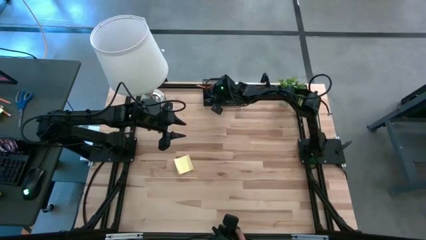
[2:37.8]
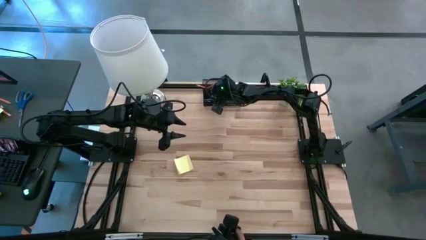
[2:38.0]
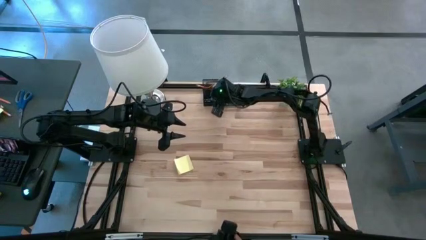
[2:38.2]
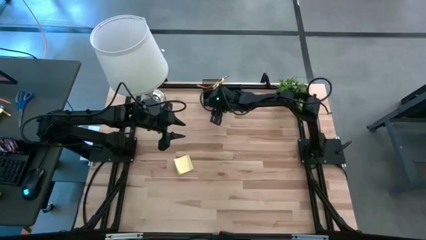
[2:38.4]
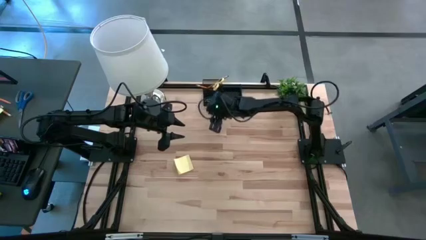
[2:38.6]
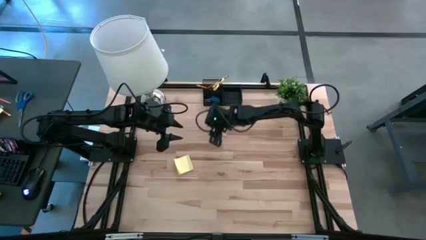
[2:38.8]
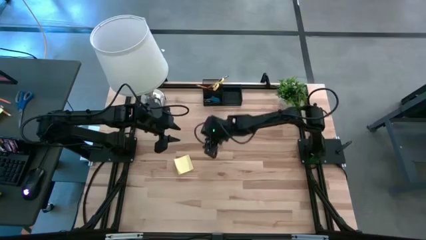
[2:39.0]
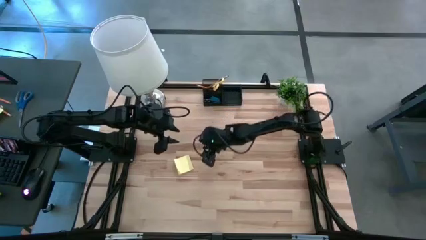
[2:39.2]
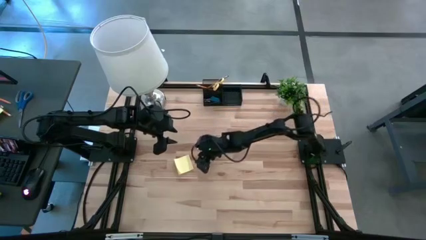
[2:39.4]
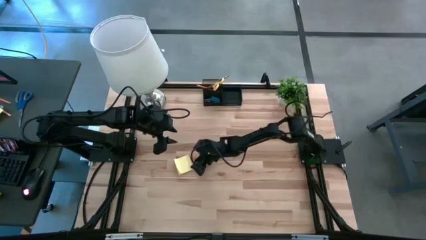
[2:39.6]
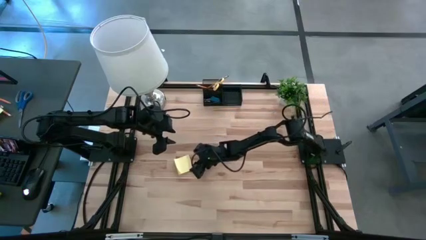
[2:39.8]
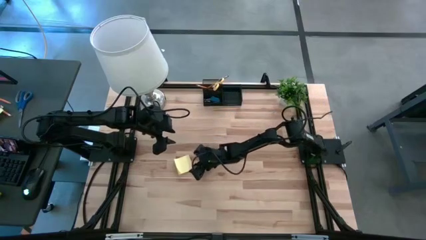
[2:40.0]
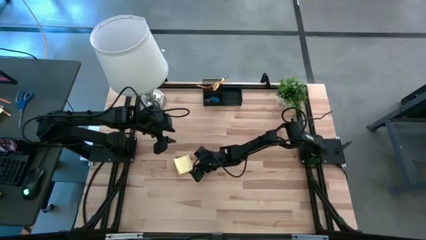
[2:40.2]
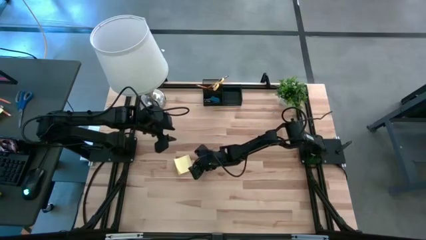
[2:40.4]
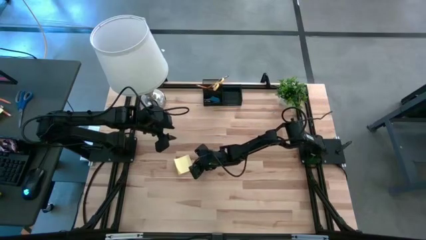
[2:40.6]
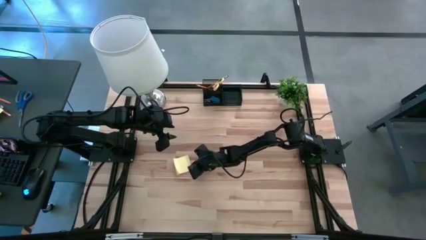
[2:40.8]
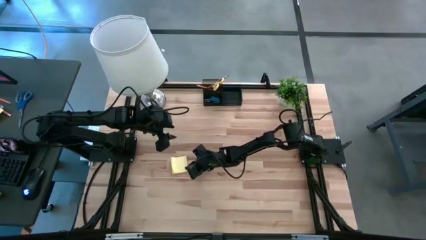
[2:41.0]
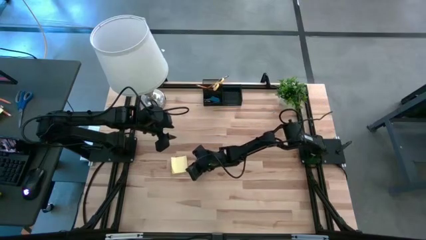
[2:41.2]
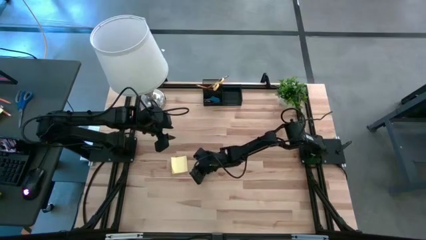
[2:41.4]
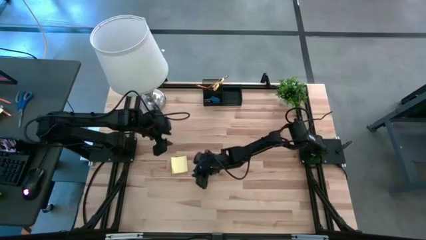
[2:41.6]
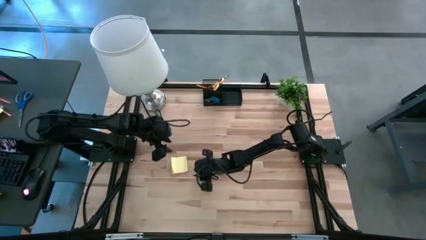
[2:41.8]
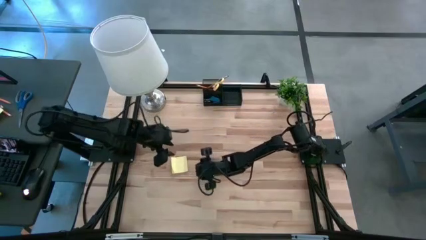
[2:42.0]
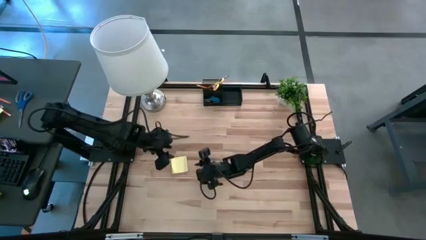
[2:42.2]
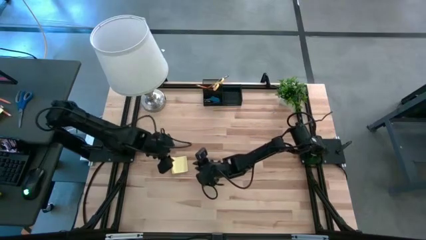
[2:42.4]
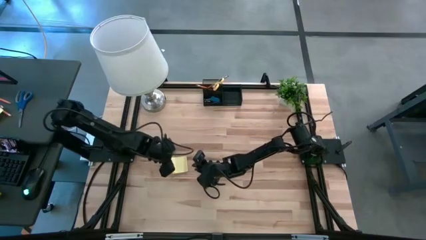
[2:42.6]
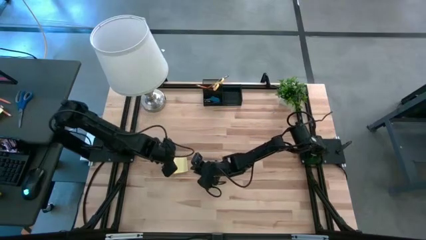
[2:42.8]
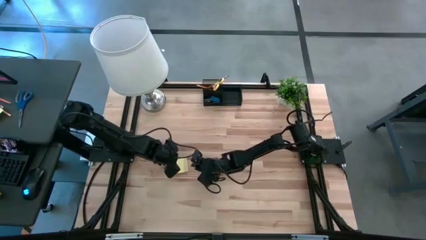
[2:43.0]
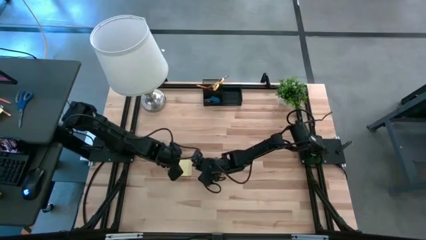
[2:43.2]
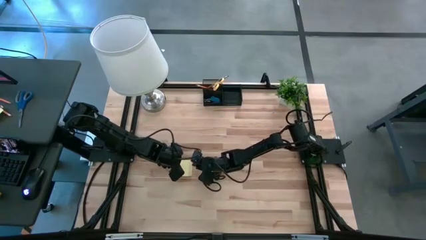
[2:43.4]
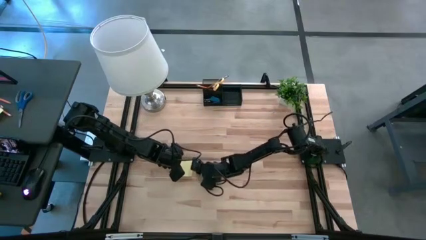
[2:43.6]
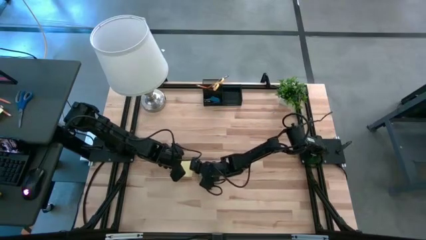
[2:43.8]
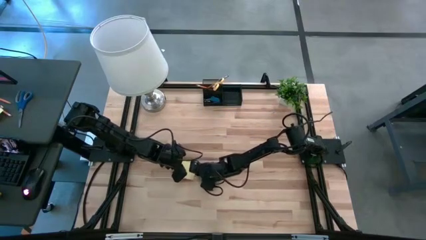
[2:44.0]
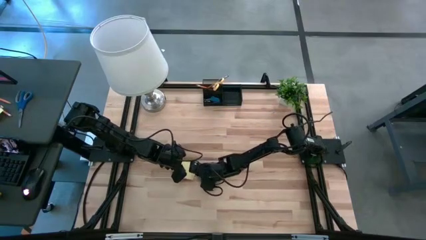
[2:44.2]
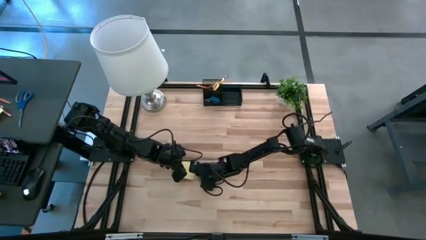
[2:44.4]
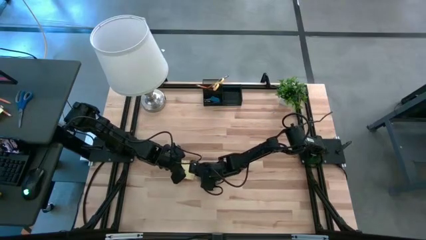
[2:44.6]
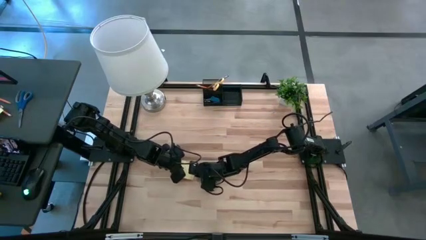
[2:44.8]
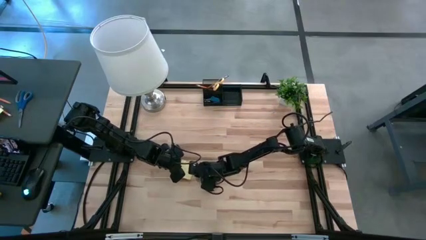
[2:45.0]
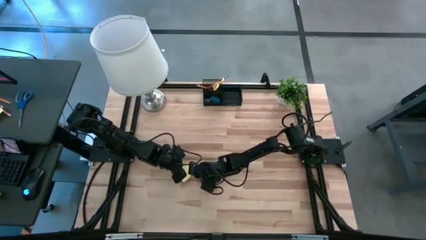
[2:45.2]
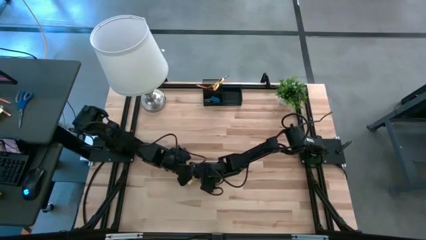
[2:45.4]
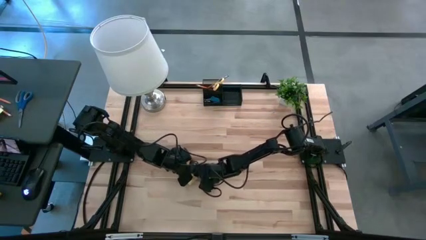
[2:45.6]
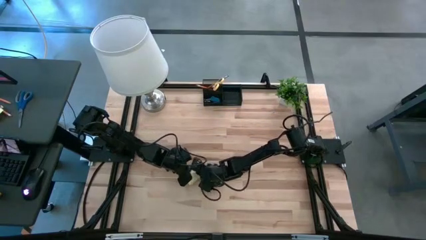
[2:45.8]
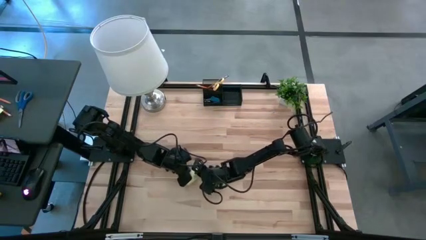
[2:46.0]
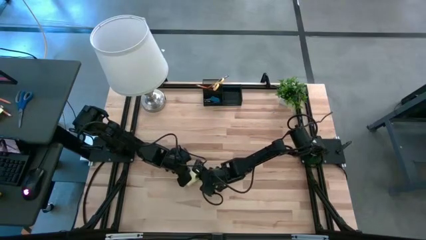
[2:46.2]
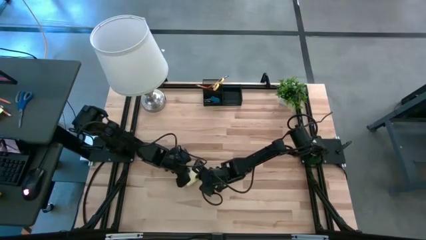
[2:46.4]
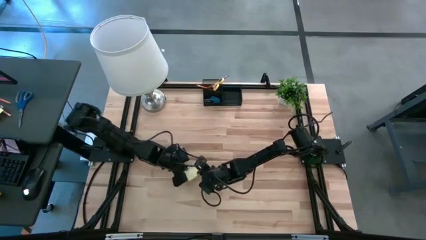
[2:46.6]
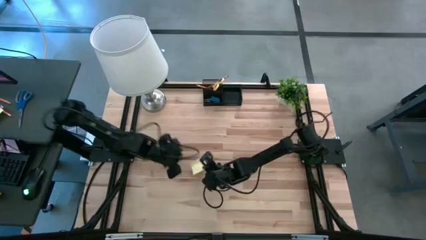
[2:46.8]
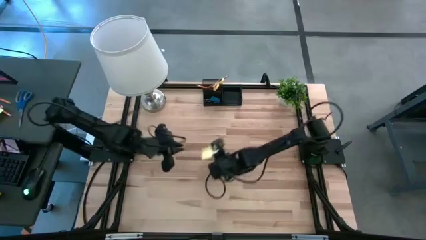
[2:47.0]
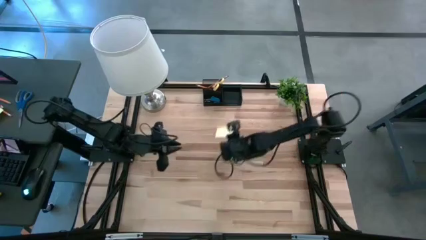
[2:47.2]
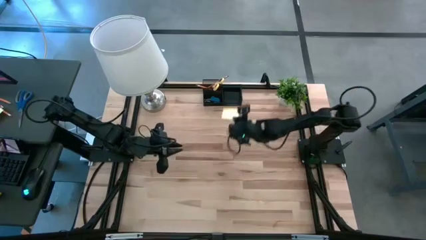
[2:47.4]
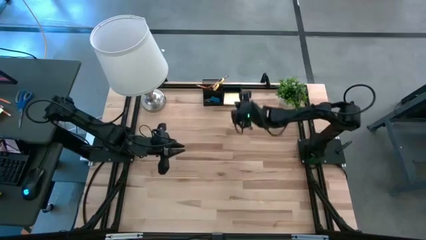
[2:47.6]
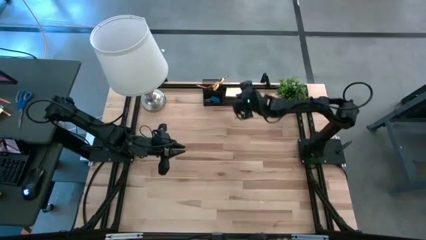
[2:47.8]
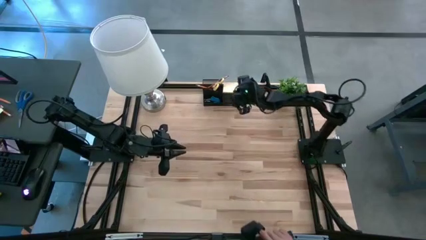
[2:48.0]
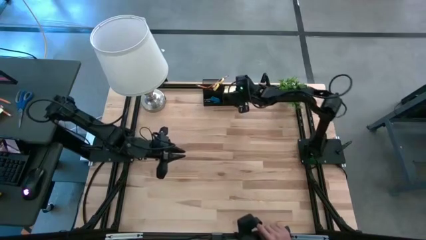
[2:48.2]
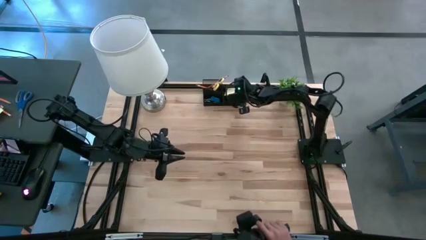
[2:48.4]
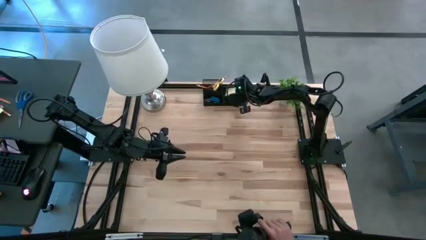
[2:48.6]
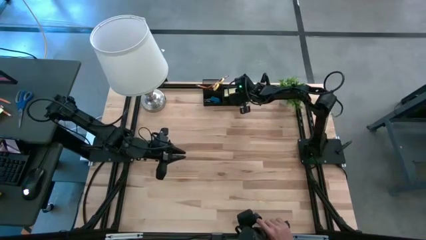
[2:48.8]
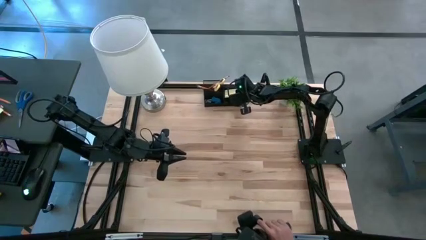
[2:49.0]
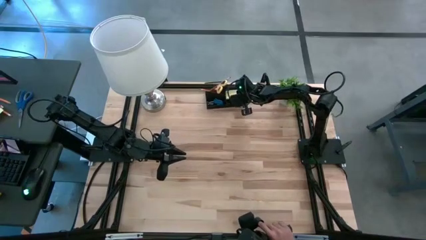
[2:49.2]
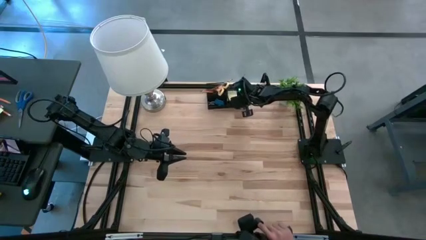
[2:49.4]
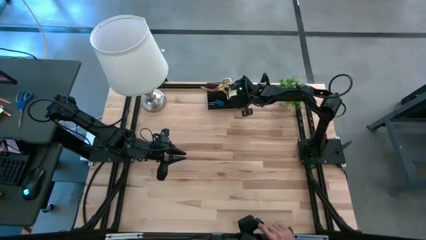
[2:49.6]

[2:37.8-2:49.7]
Task: Pick and place office supplies into organizer
Put the sticky notes into the desk organizer

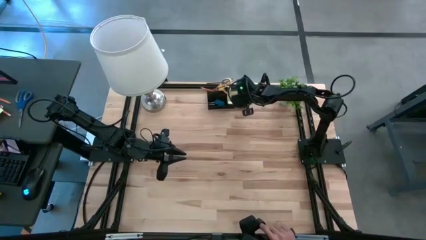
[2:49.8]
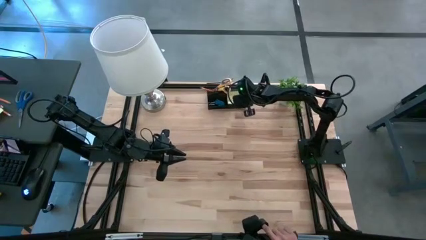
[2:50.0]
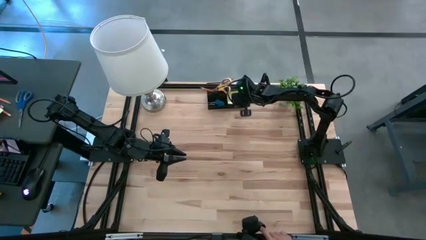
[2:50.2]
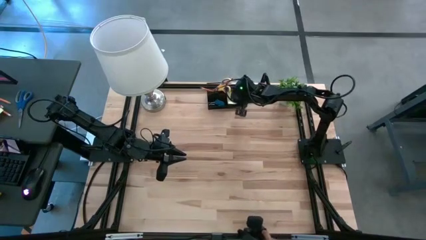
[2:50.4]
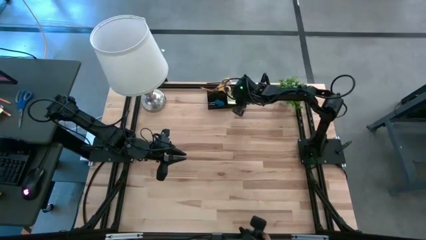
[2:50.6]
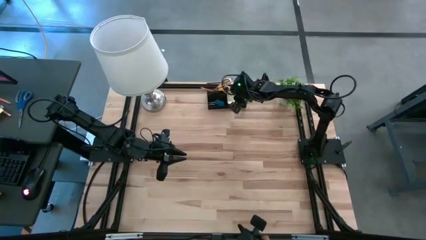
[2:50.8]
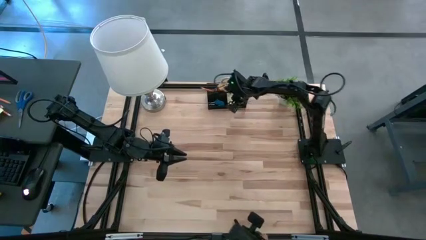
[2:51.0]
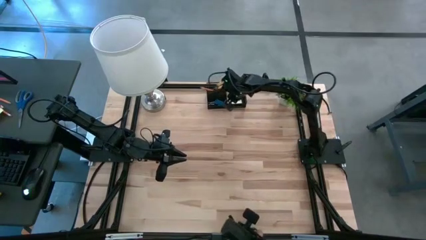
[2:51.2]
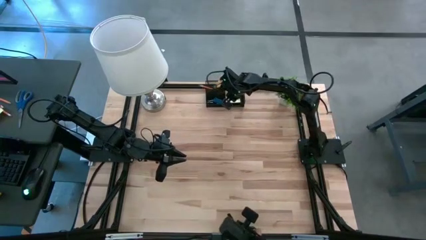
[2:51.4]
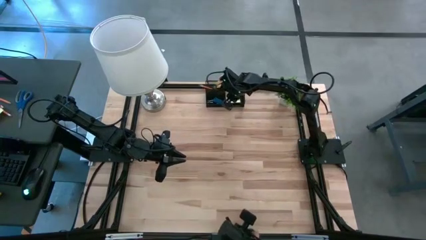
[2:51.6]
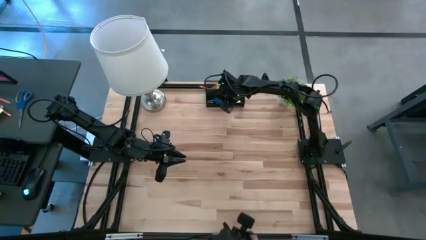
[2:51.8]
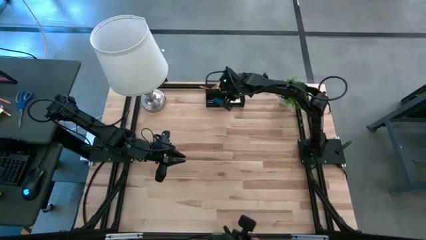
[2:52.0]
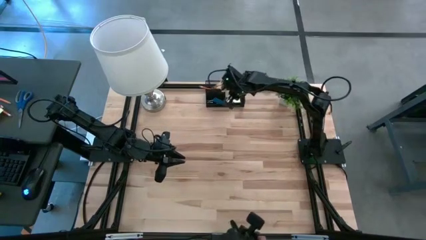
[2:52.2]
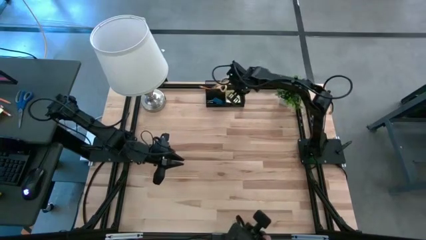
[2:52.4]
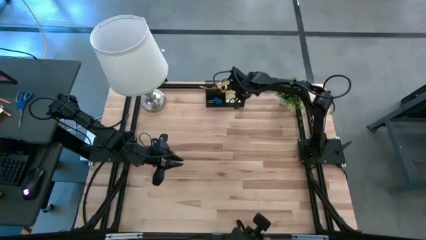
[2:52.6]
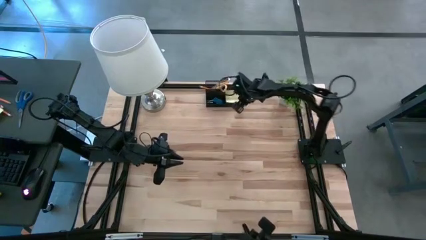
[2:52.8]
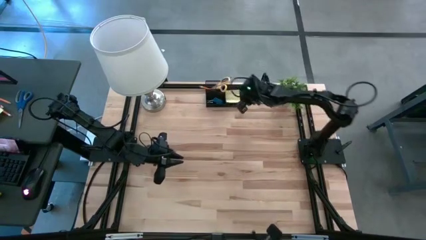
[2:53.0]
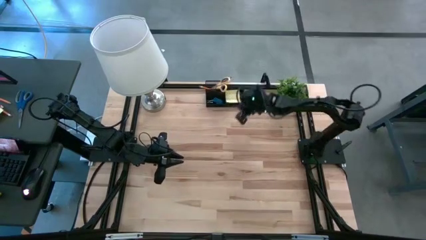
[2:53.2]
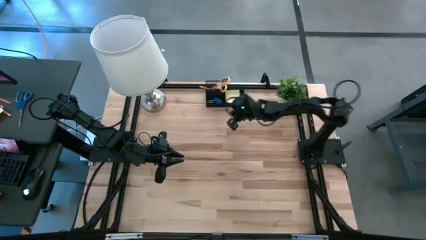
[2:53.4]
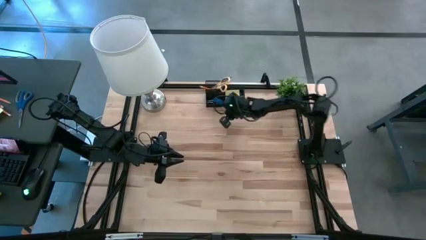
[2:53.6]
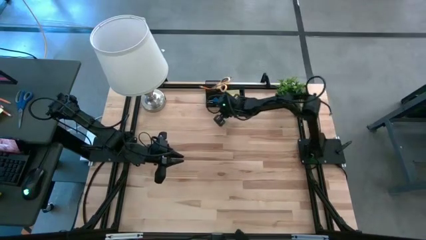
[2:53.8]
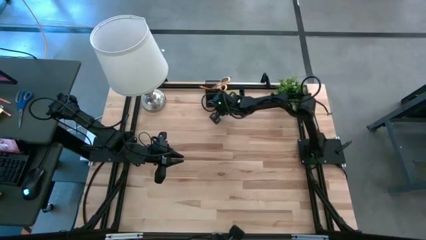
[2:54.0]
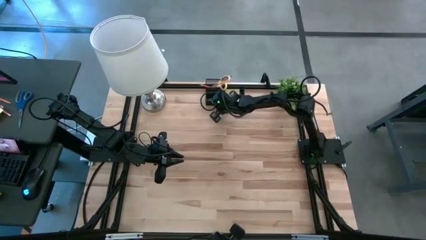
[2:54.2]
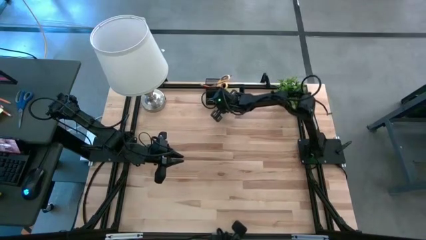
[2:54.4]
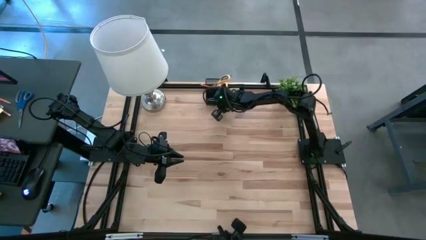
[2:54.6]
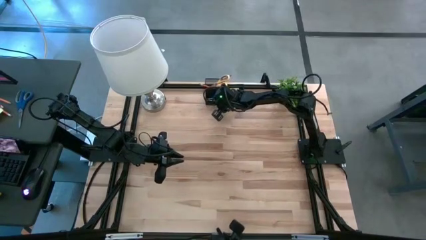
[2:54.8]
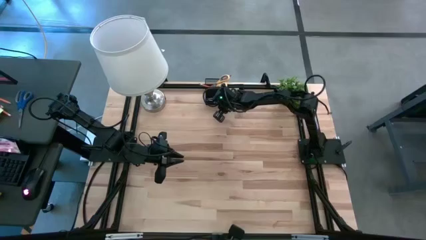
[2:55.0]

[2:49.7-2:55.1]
Adjust the desk organizer
